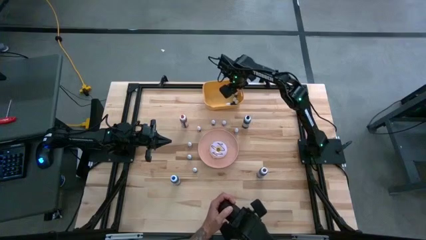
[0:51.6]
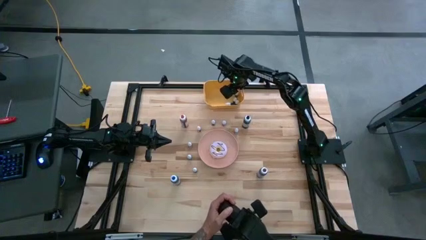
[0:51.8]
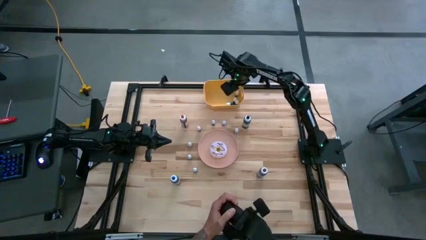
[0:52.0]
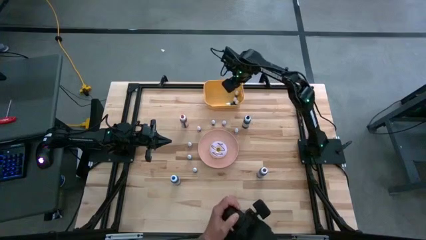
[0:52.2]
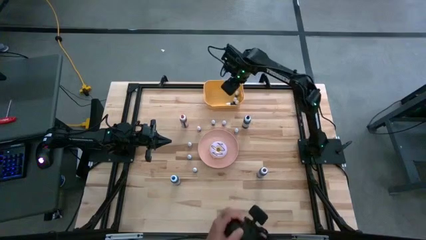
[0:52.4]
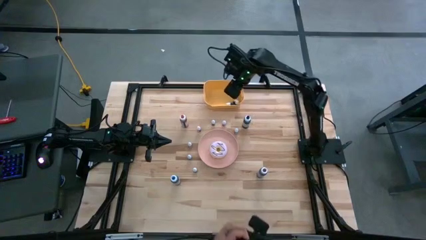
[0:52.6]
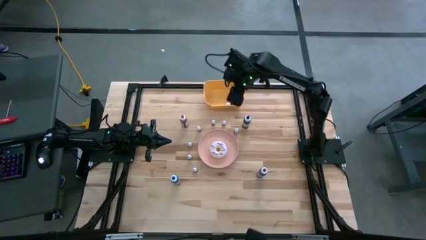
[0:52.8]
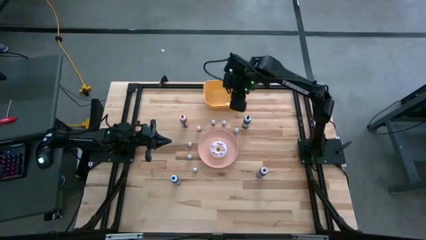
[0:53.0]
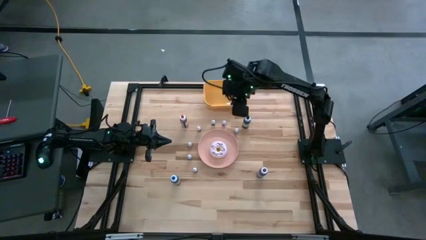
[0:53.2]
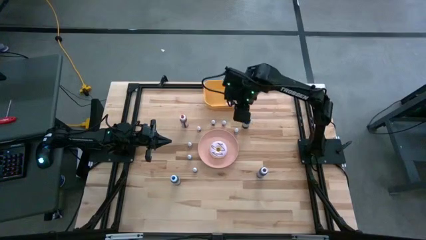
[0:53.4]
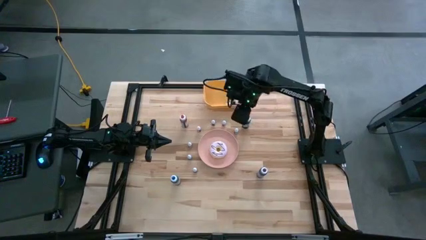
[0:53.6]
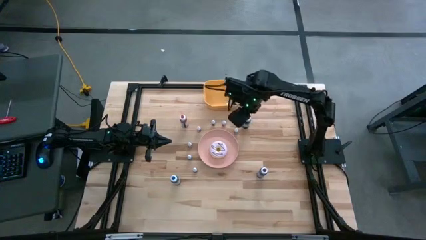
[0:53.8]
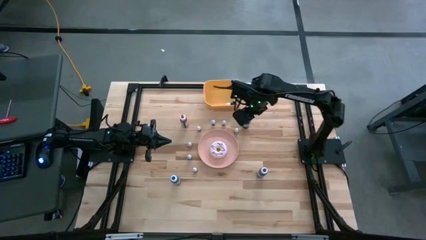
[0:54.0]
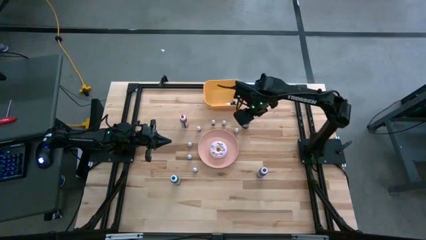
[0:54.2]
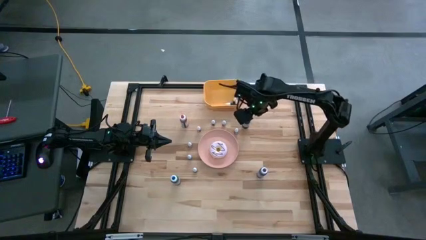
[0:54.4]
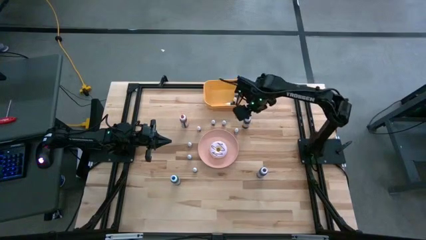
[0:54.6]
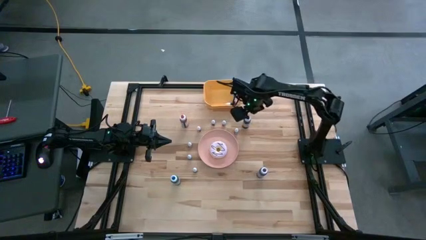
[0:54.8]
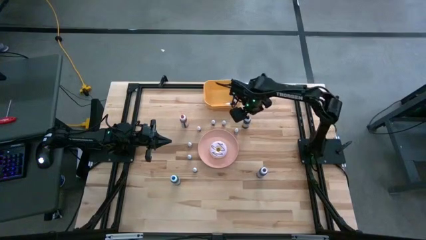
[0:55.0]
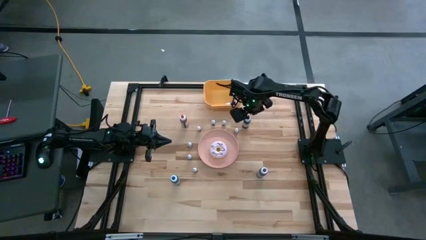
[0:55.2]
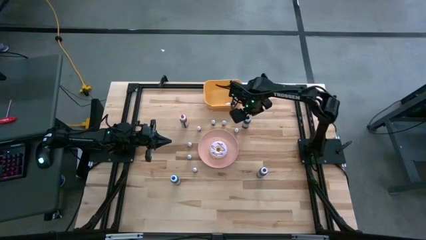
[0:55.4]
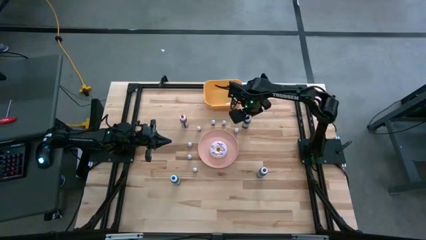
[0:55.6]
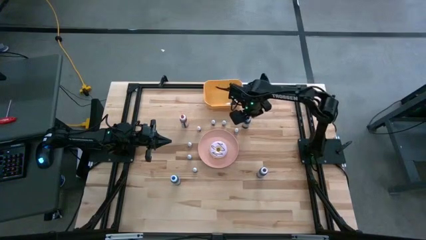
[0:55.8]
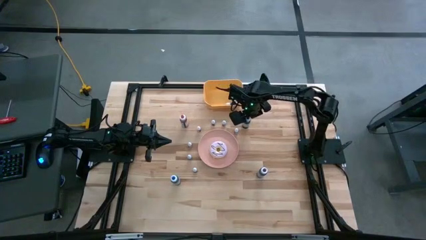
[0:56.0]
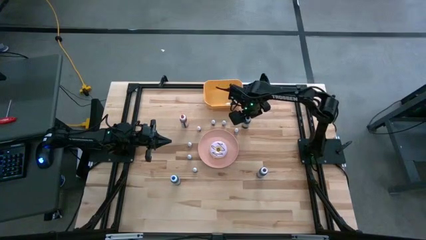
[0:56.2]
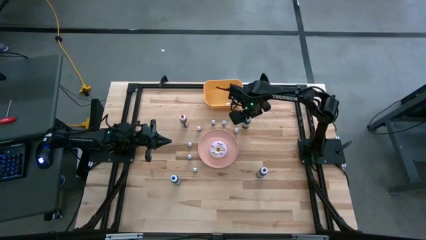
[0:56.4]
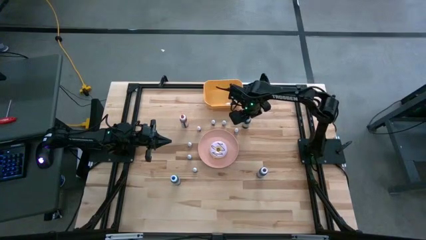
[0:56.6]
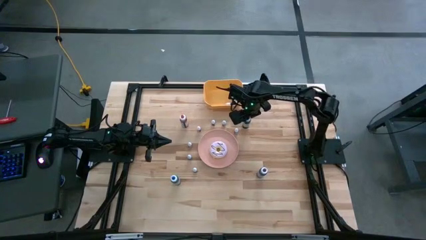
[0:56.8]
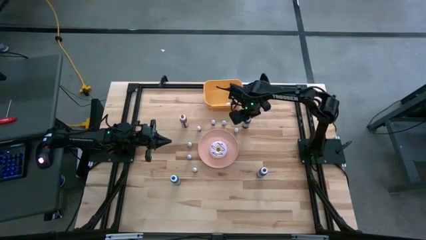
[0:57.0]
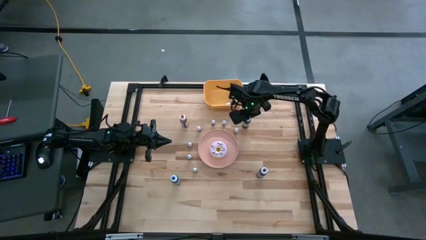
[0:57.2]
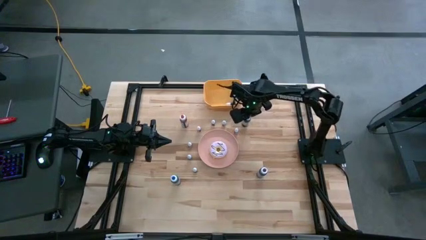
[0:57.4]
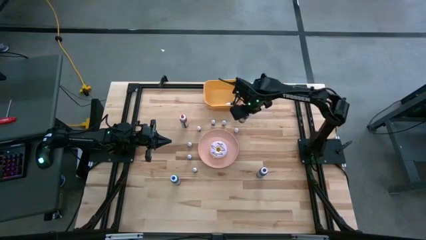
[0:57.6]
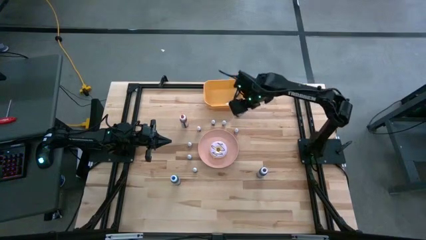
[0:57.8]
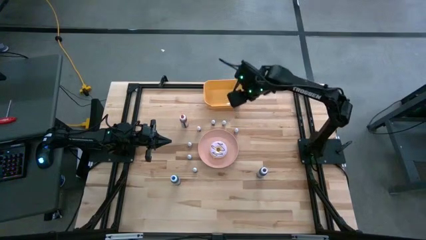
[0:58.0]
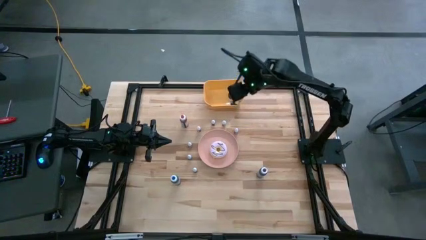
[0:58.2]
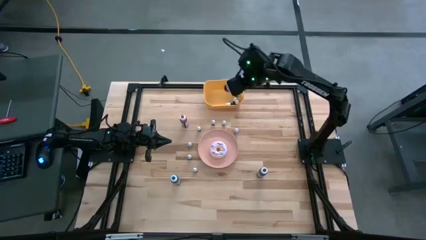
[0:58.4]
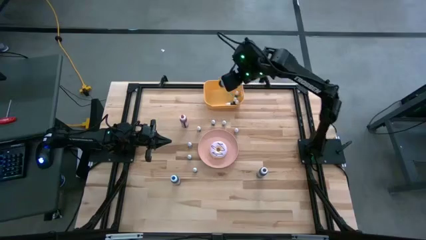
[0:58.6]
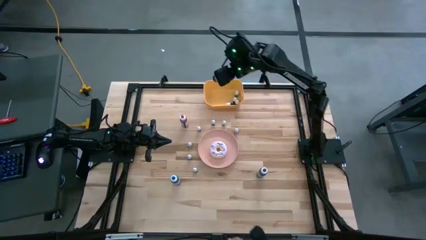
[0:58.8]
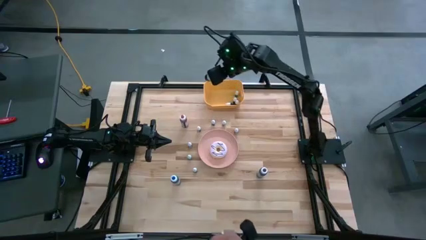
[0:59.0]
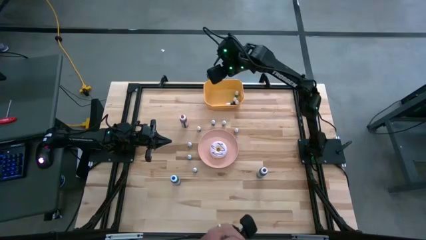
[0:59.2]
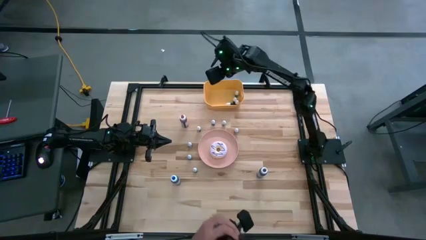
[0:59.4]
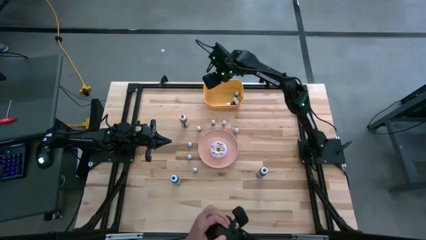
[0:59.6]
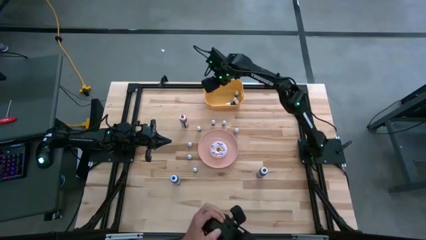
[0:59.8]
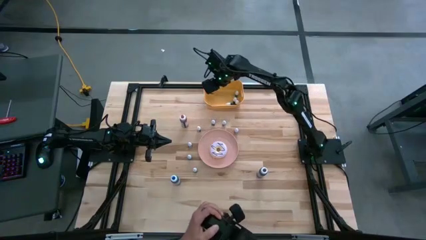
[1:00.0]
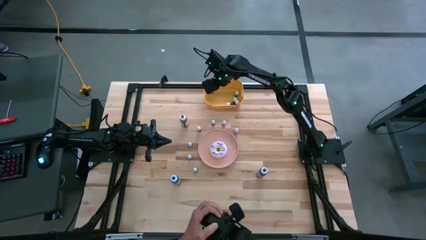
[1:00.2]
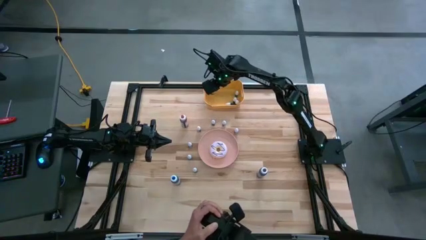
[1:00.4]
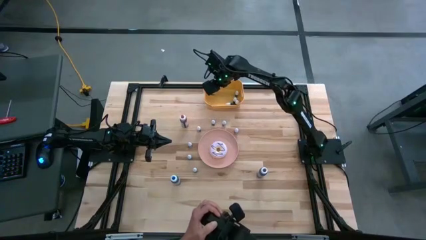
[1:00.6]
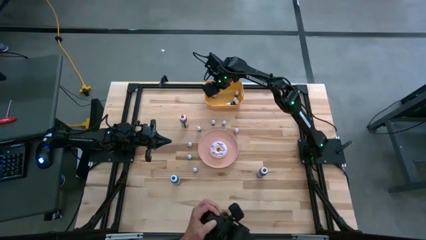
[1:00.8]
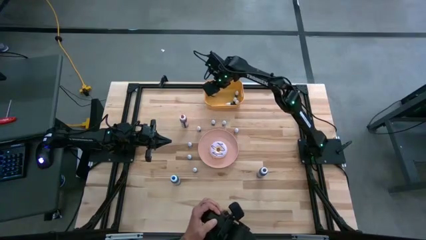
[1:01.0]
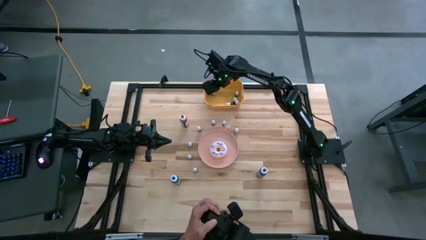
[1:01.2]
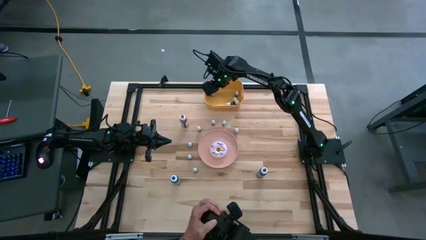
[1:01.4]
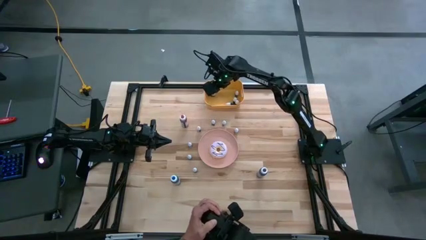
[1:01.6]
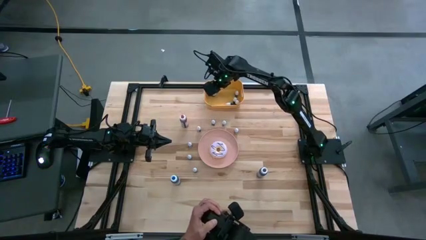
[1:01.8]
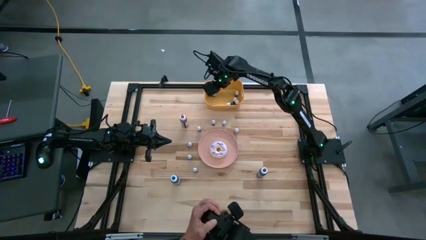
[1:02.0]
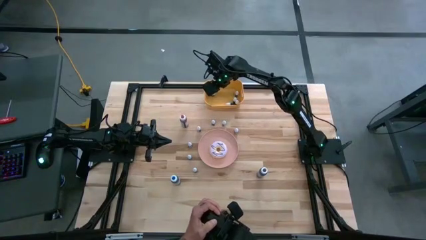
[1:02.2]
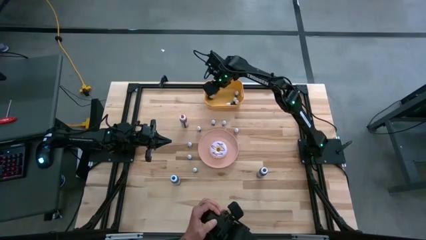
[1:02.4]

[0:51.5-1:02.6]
Task: Pick & Place food coloring
Put the large black food coloring bottle into the orange bin

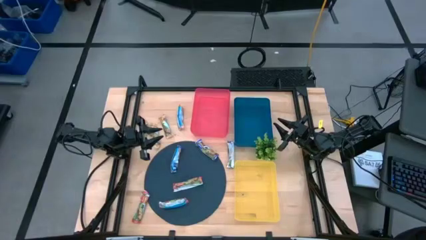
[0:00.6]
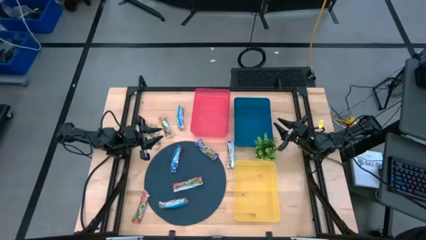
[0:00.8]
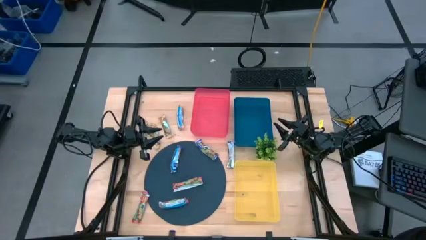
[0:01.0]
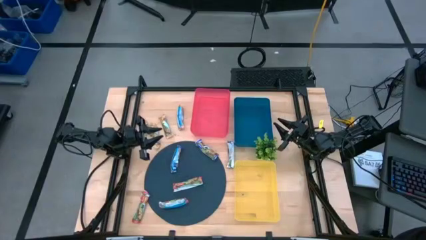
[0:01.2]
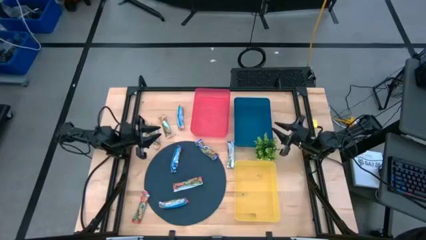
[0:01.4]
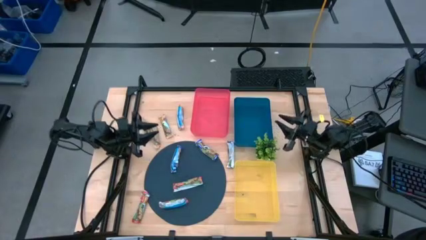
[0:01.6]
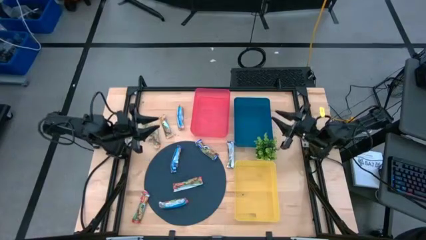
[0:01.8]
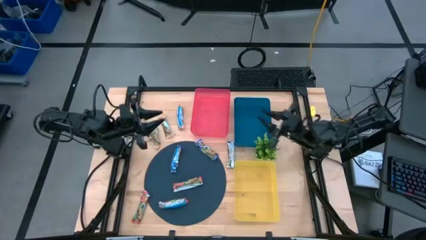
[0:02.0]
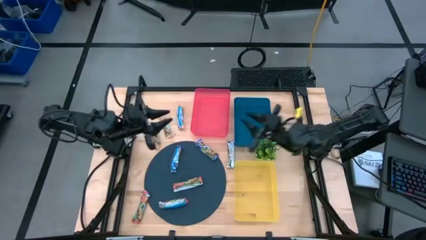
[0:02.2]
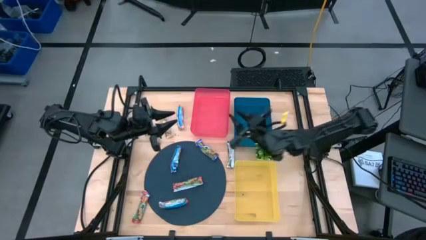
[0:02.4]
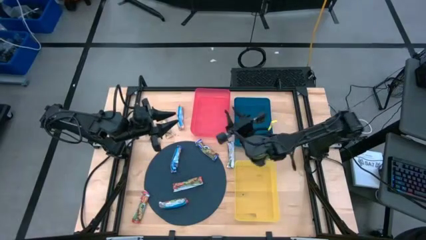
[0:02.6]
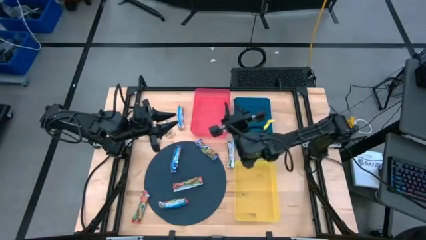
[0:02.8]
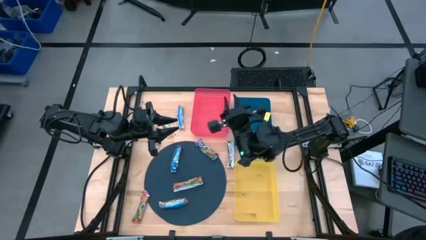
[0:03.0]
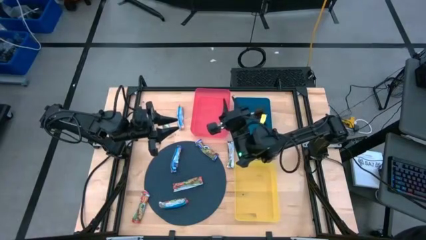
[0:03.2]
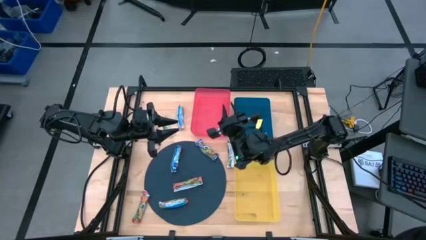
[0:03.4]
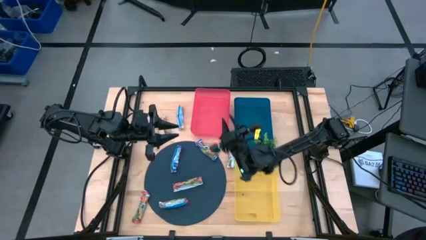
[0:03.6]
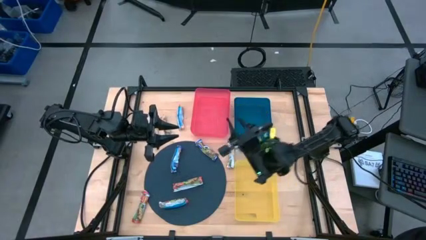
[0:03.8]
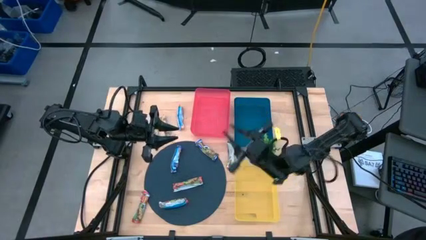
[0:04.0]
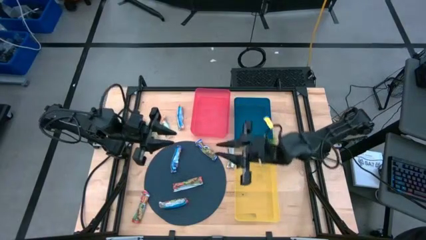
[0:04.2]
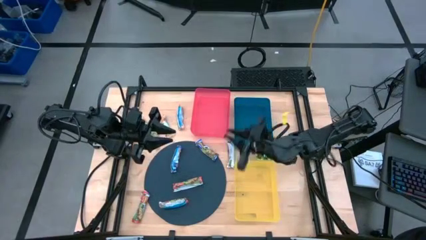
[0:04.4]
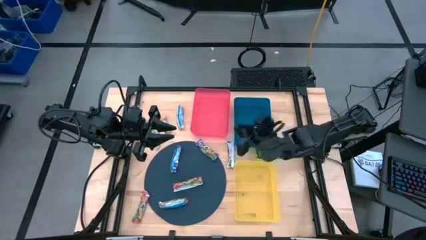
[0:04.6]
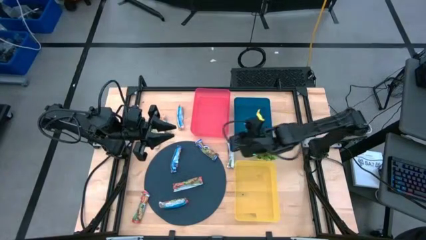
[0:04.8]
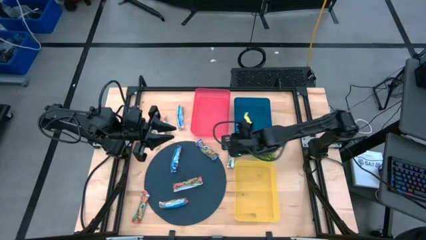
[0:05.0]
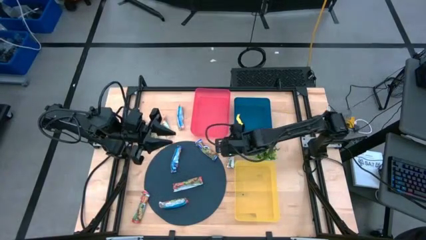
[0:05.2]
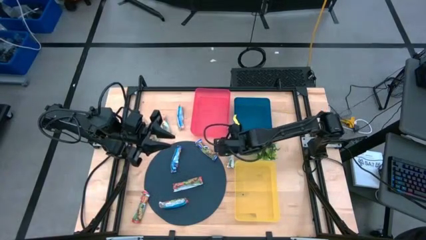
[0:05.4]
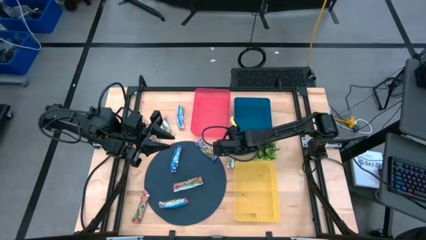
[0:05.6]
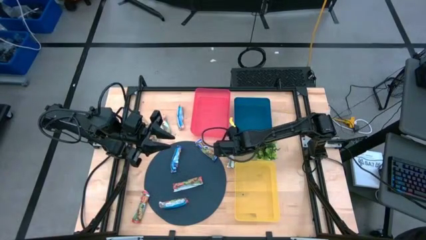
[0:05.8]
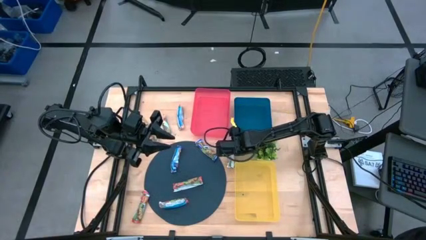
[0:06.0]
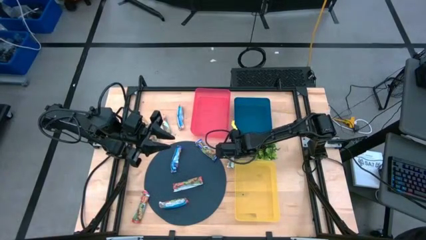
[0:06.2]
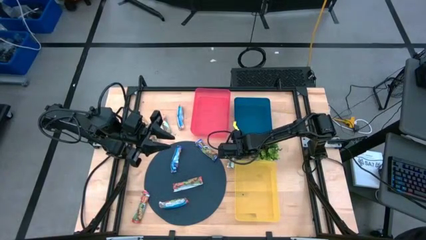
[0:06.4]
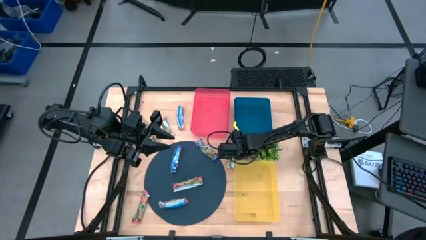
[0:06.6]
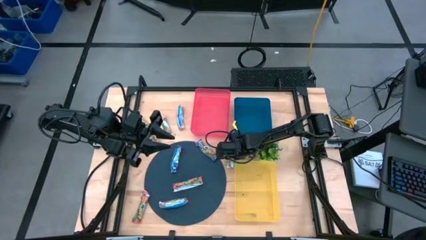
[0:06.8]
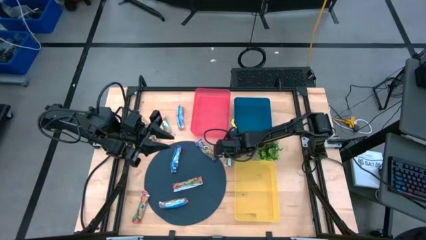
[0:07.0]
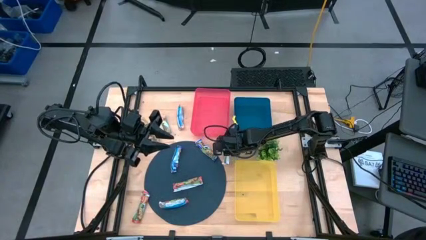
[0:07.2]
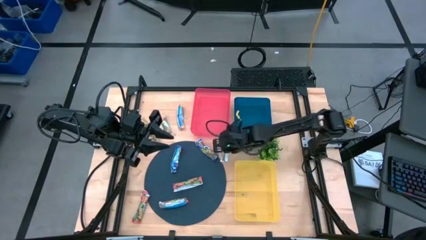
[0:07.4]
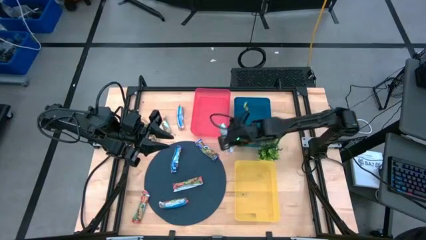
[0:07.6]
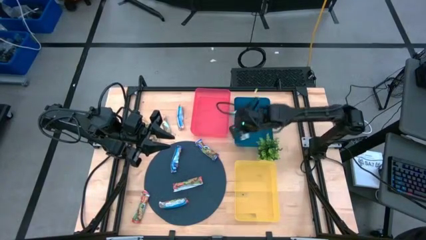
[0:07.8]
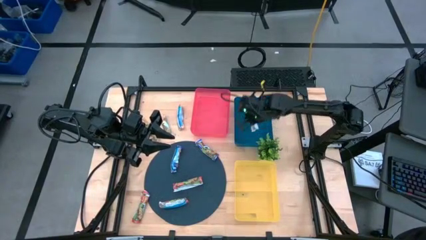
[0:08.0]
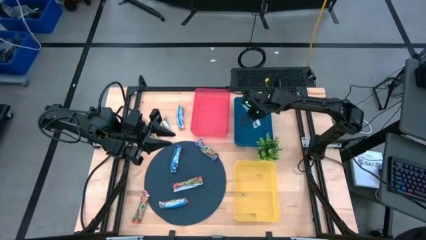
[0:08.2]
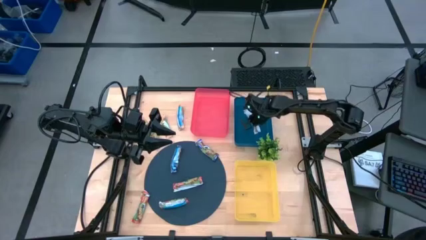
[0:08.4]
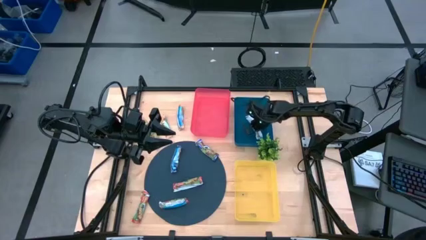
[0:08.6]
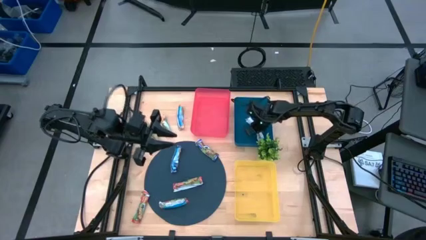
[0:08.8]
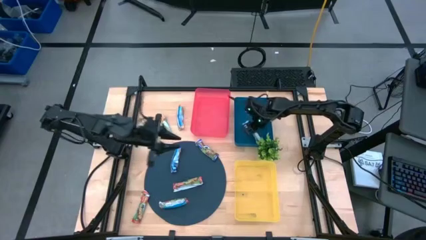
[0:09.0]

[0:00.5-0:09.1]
Task: Pick and place Granola Bars by type
Put the blue granola bar into the blue bin
